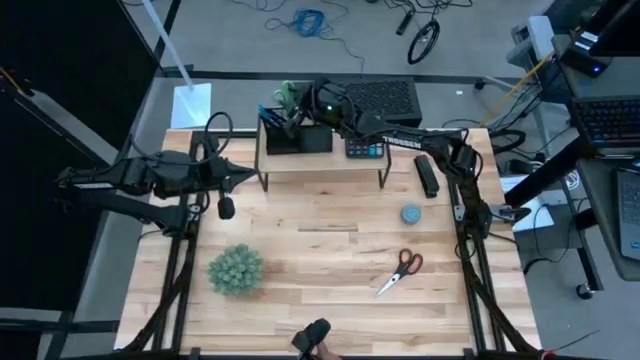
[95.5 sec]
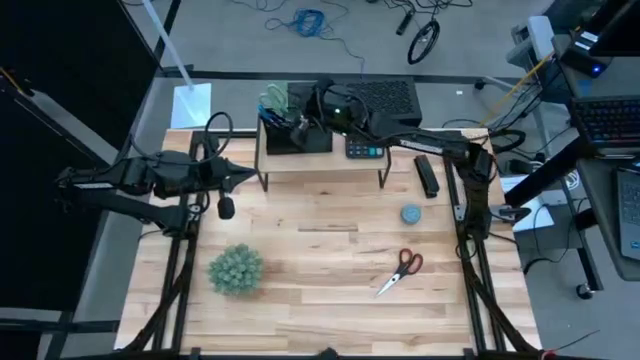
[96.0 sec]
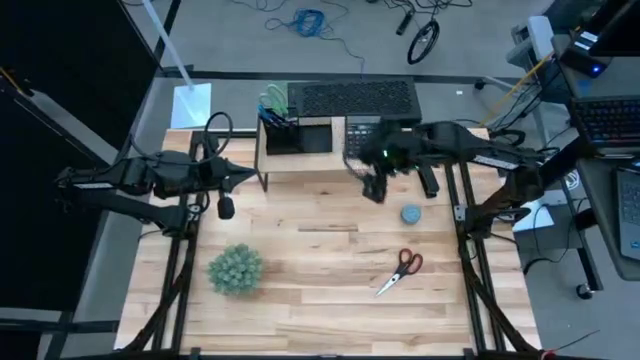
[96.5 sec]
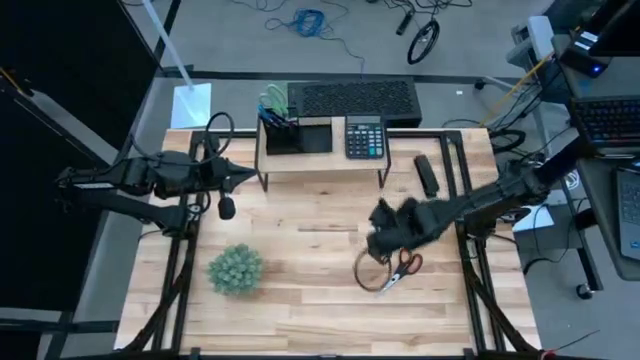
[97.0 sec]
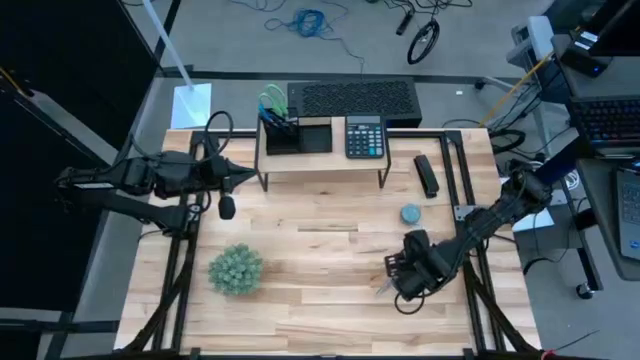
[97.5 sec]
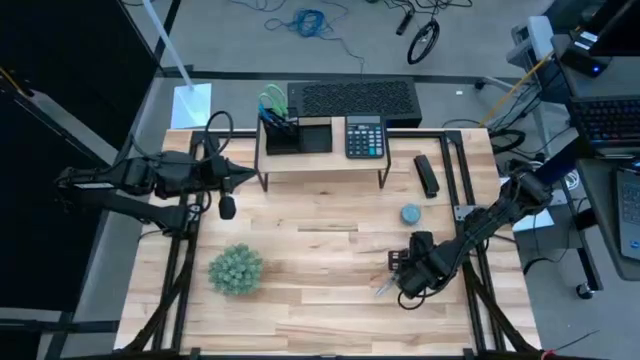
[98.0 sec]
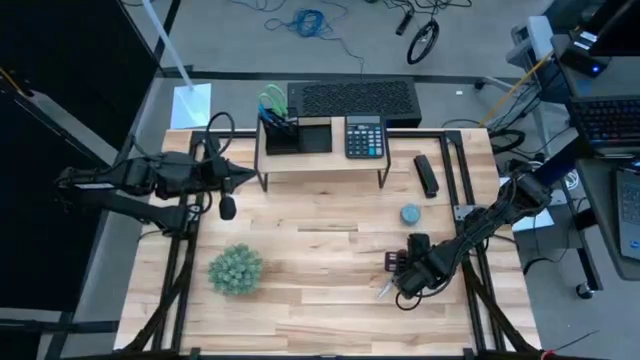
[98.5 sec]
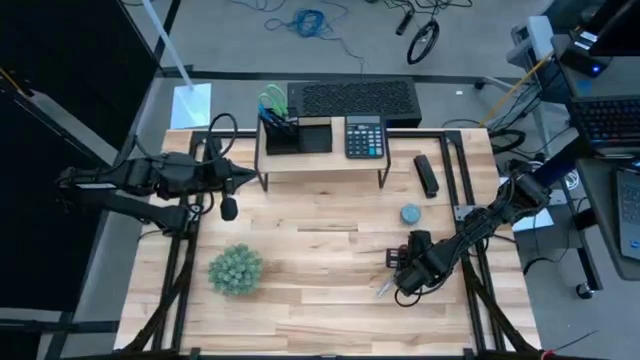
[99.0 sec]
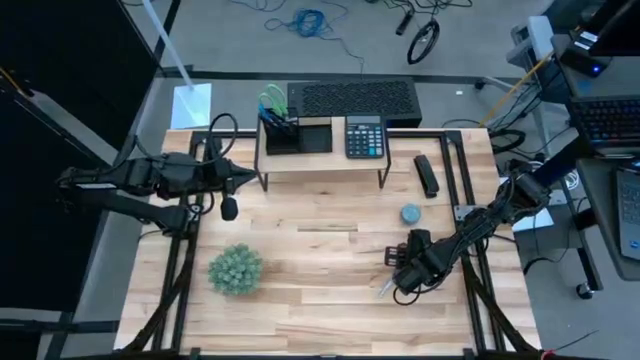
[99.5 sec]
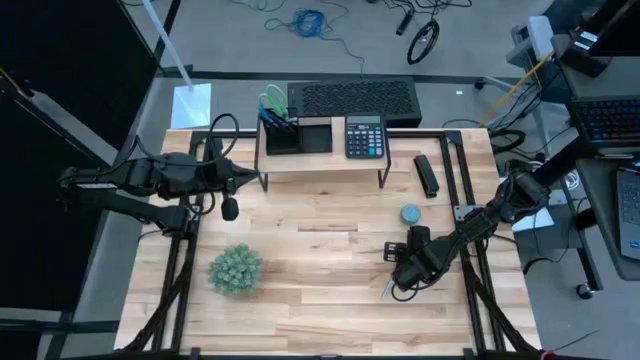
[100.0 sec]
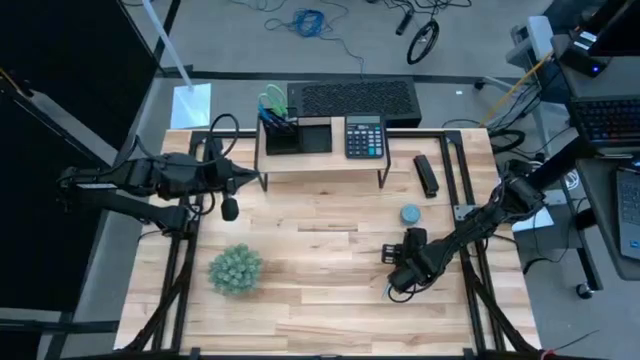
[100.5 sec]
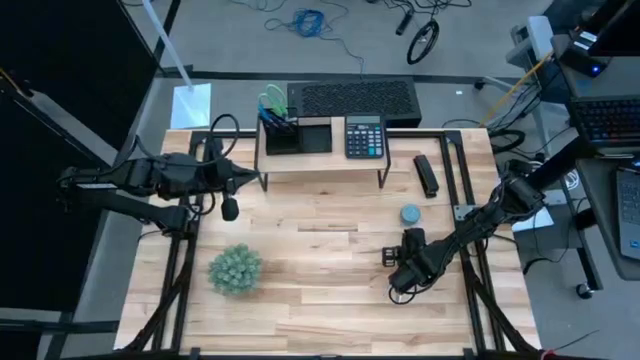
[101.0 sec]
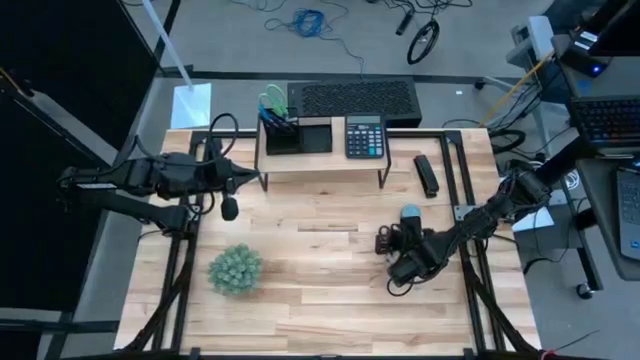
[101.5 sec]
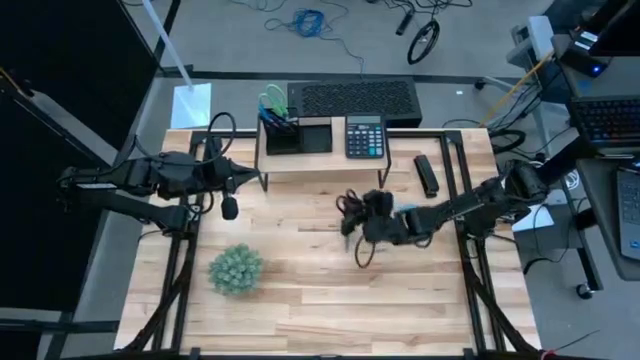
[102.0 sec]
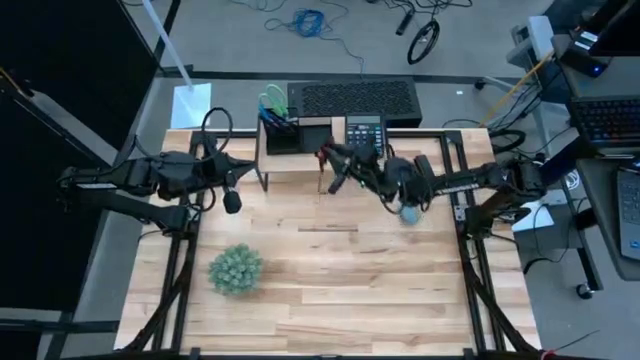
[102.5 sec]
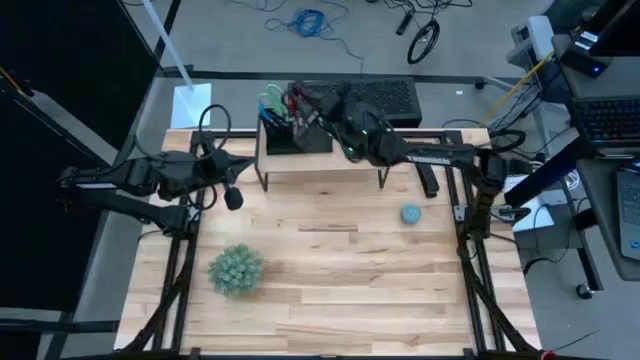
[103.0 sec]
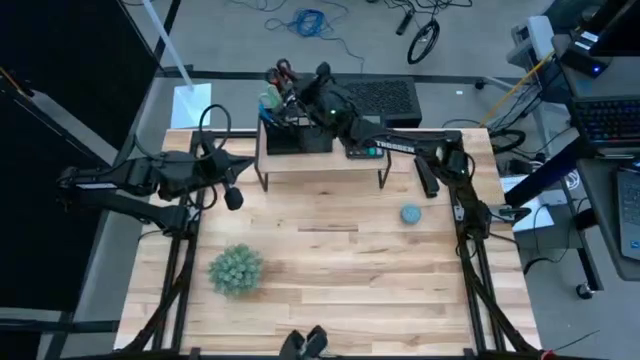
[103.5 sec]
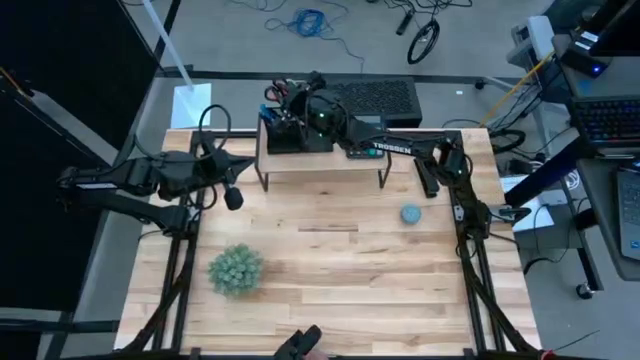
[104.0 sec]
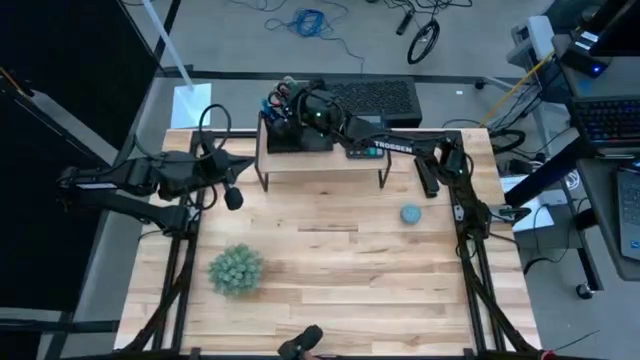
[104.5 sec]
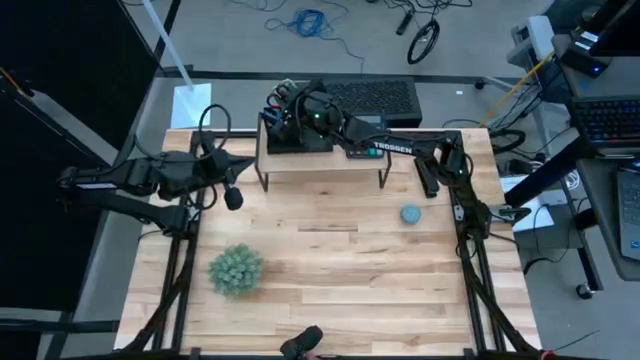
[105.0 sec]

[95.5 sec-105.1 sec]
Task: Pick and place office supplies into organizer
Put the black scissors into the desk organizer on the shelf

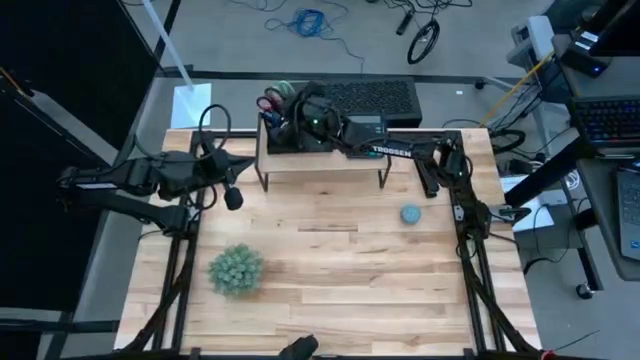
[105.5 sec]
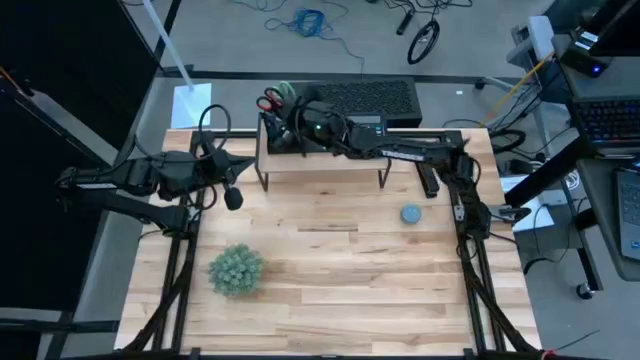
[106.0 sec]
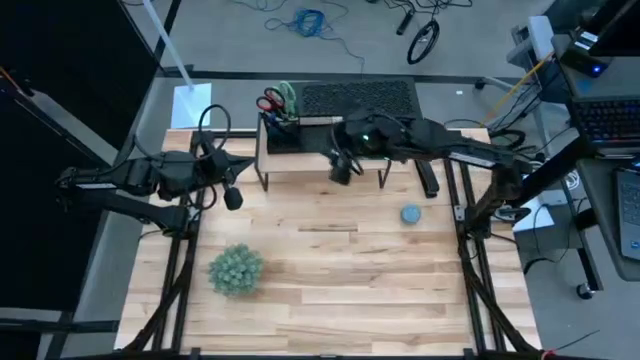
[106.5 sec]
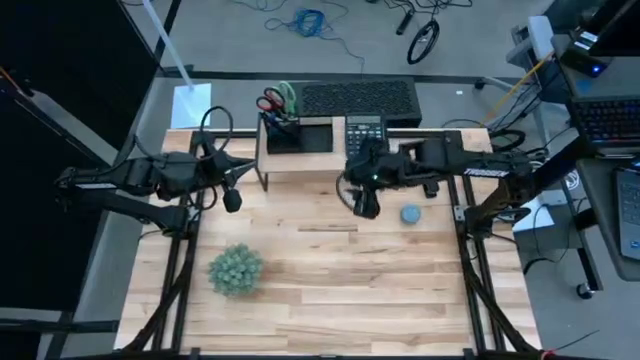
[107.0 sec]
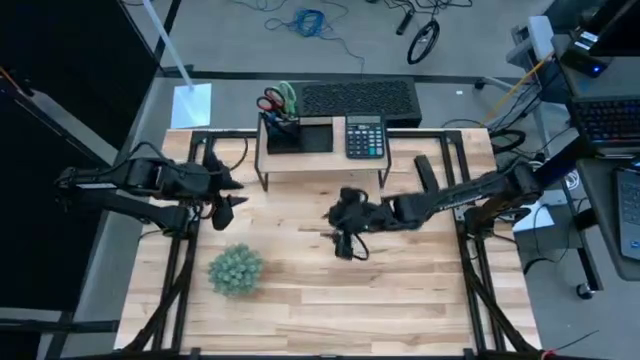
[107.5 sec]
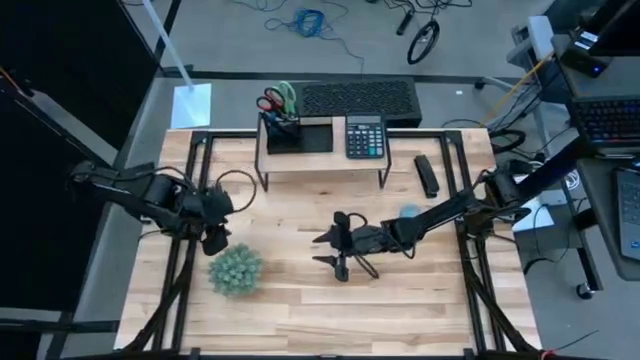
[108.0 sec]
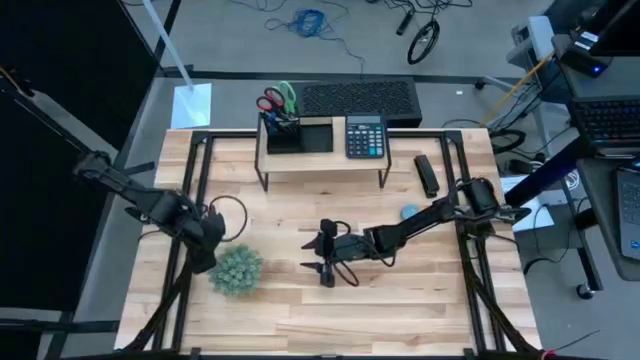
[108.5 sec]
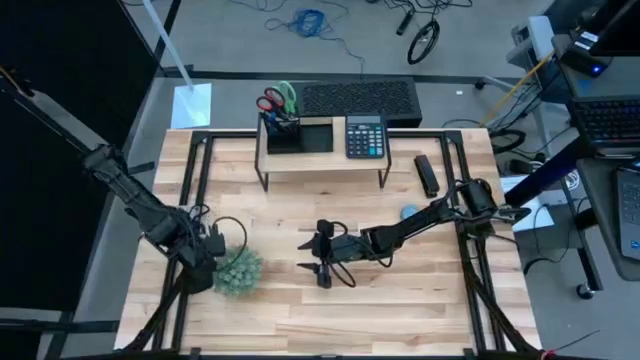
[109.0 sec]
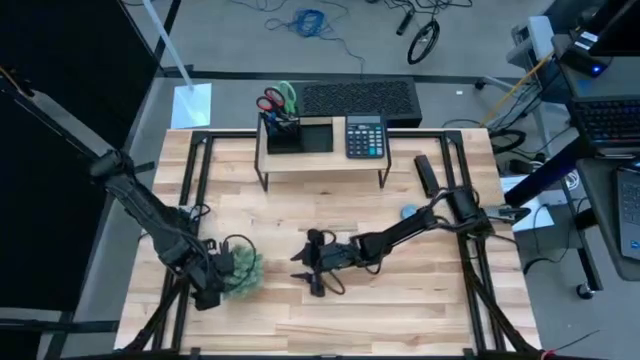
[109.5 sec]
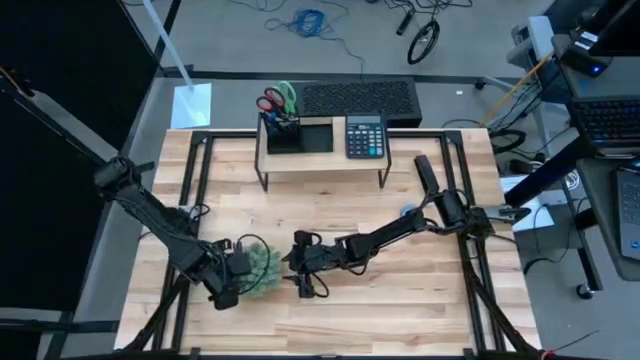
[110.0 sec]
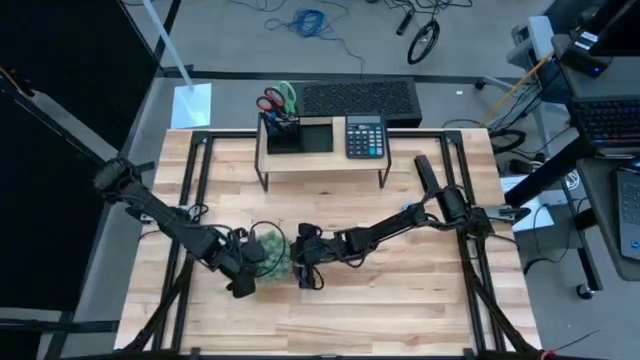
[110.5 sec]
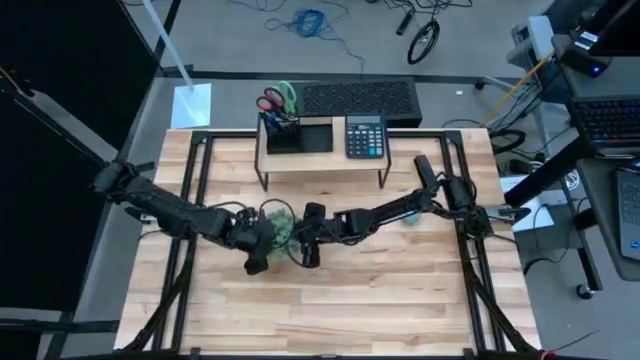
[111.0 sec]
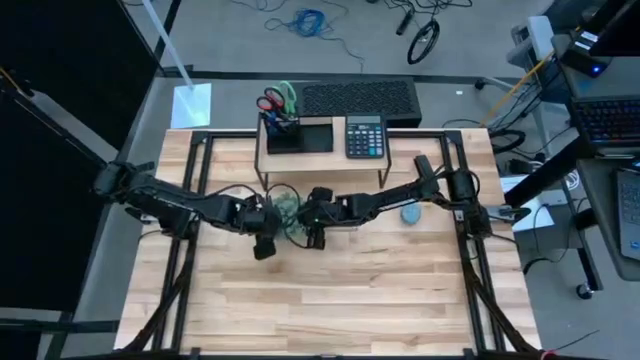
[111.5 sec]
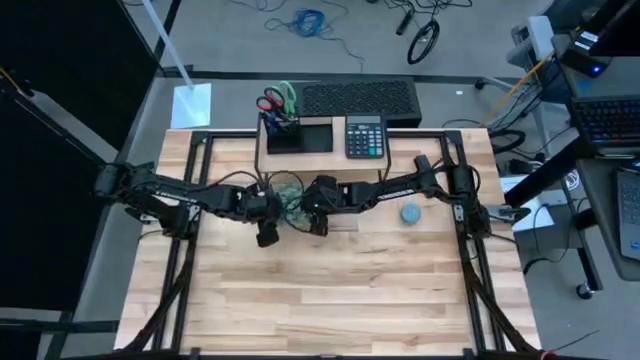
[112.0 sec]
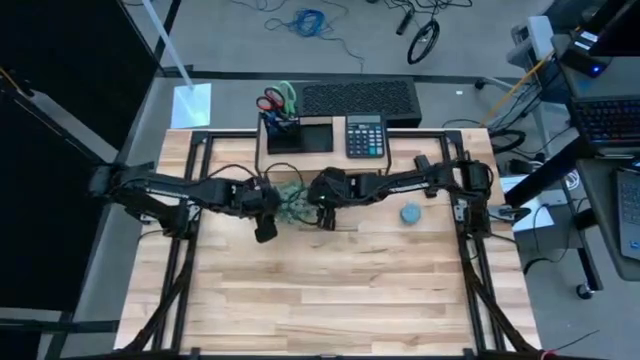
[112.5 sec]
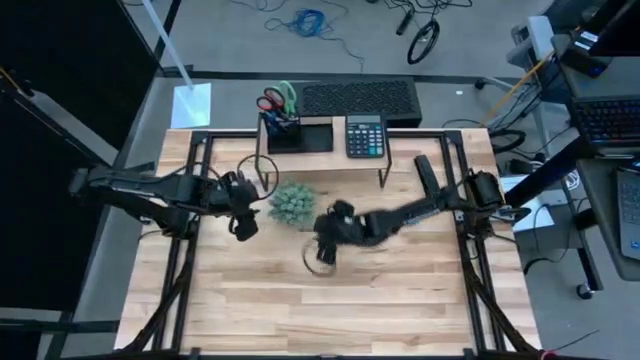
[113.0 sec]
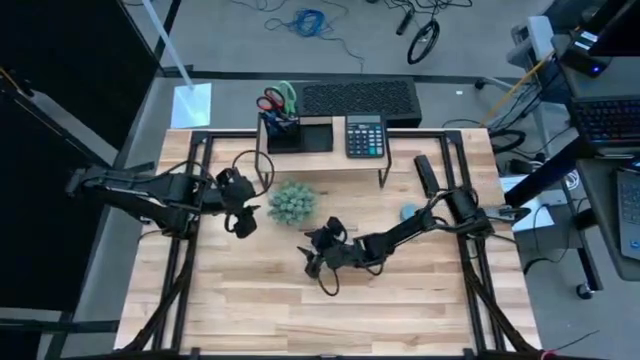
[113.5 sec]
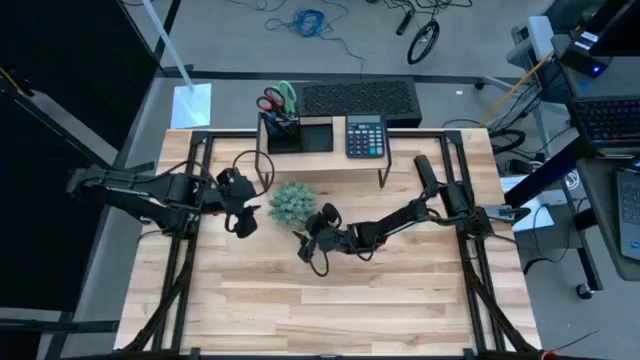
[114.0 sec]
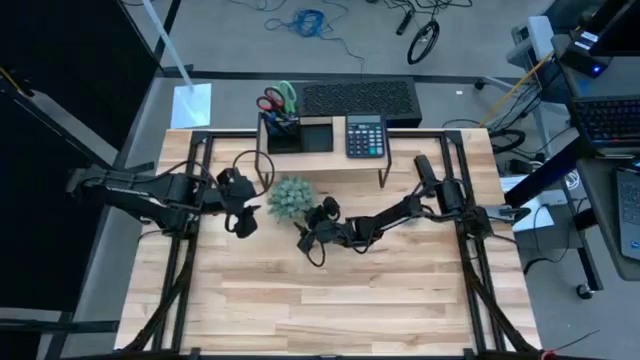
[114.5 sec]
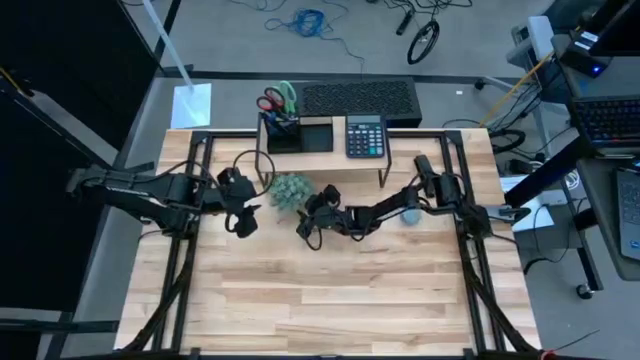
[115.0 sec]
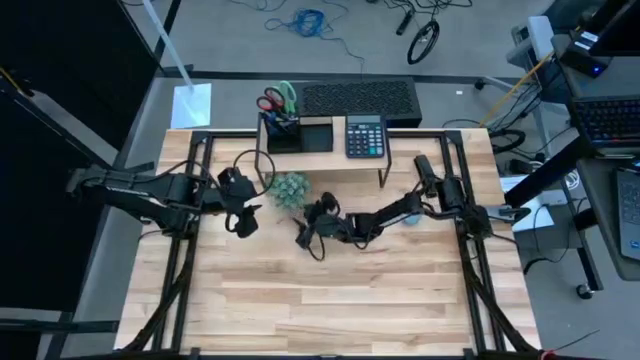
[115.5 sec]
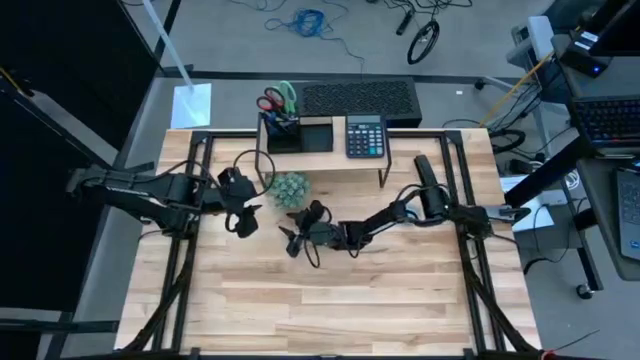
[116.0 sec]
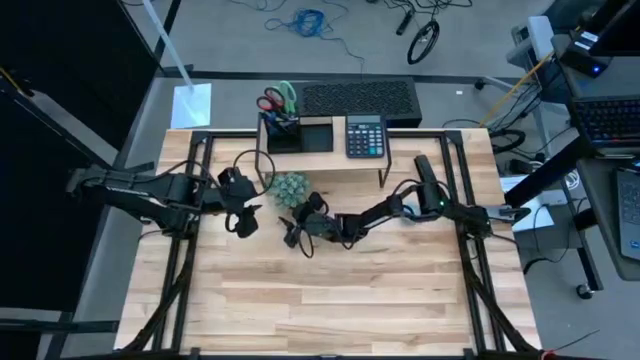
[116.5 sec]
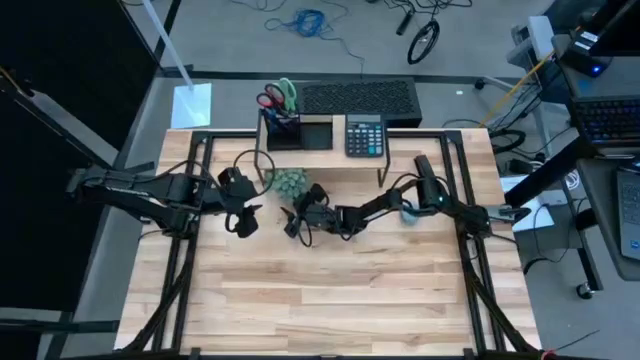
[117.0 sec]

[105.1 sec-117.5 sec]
Move the green potted plant under the shelf
